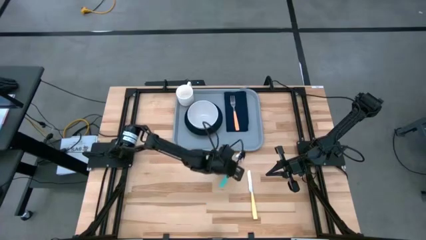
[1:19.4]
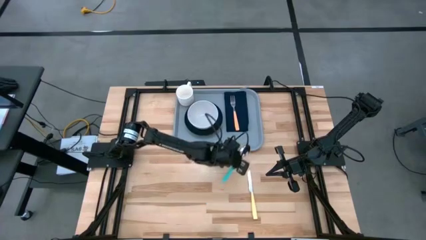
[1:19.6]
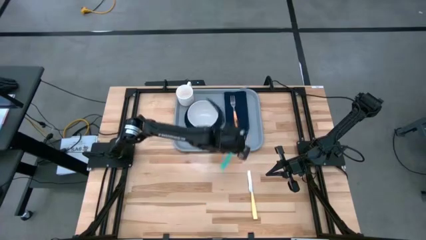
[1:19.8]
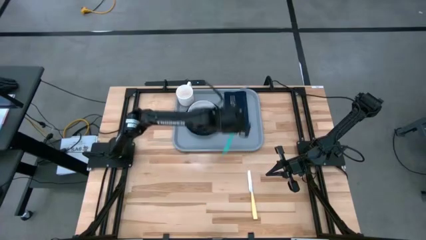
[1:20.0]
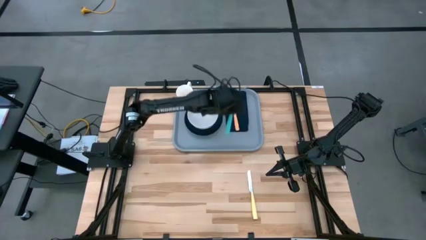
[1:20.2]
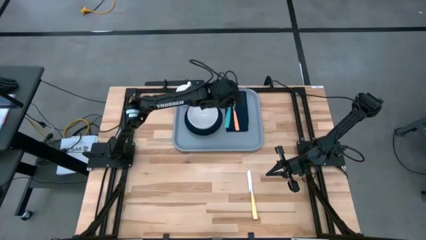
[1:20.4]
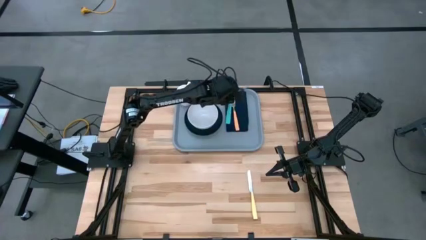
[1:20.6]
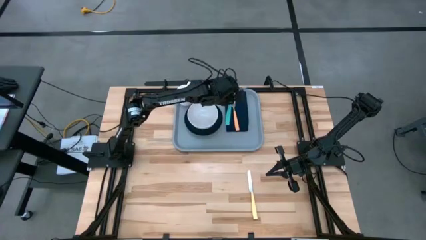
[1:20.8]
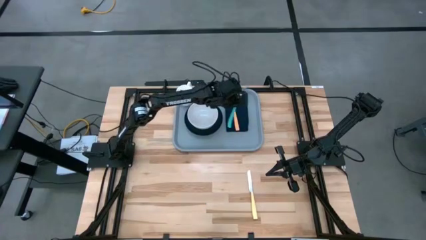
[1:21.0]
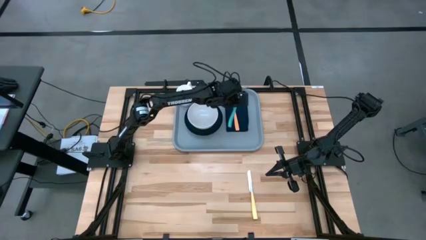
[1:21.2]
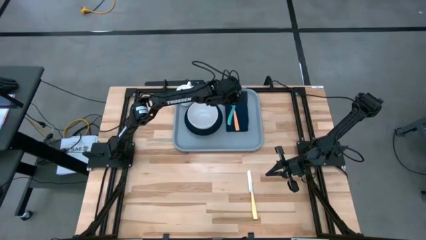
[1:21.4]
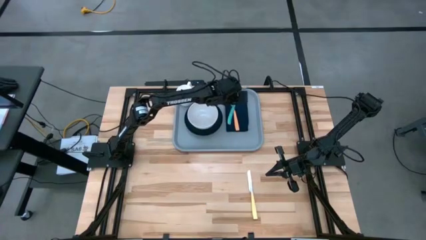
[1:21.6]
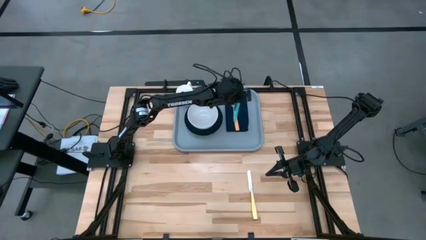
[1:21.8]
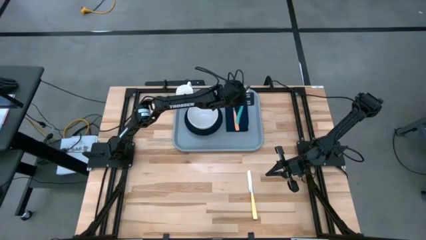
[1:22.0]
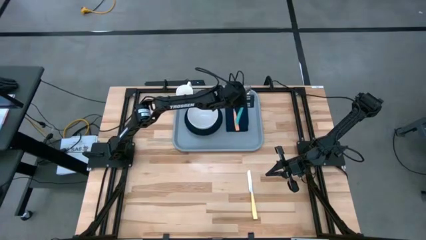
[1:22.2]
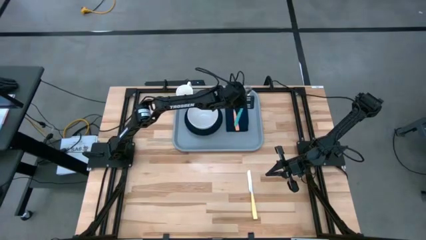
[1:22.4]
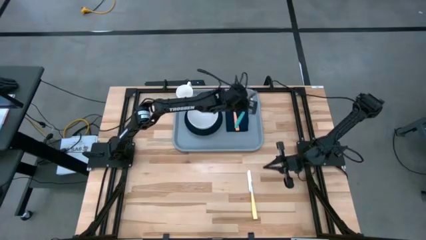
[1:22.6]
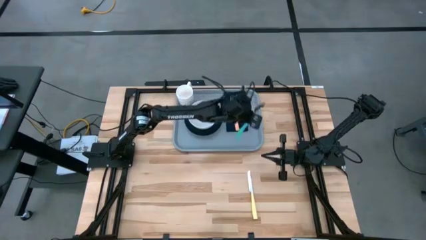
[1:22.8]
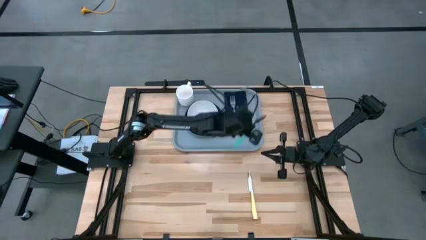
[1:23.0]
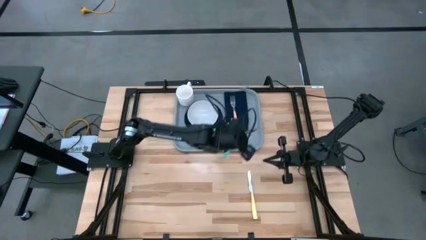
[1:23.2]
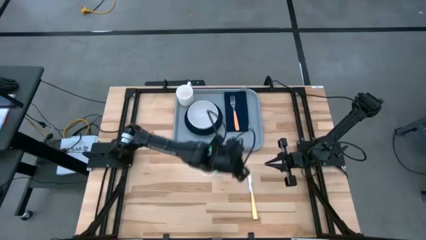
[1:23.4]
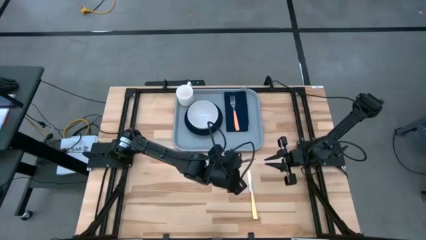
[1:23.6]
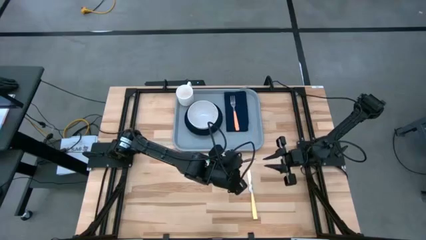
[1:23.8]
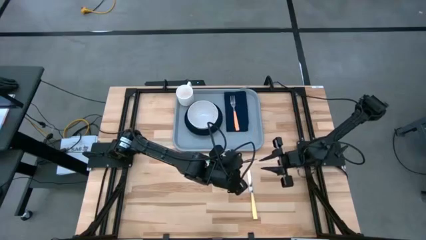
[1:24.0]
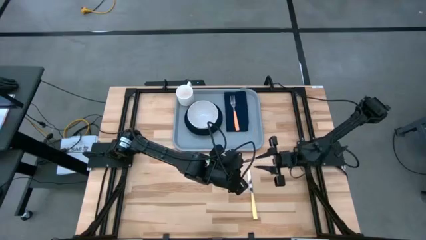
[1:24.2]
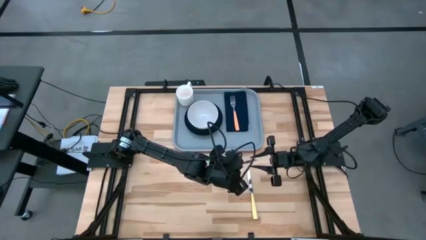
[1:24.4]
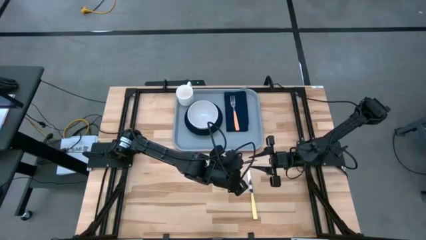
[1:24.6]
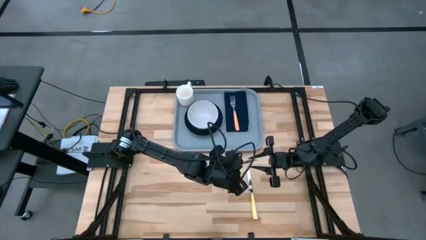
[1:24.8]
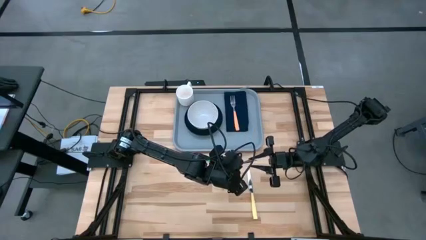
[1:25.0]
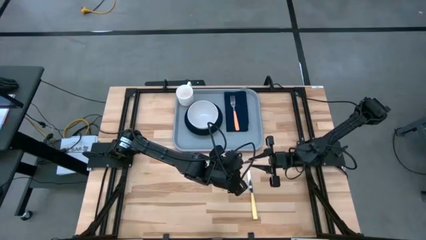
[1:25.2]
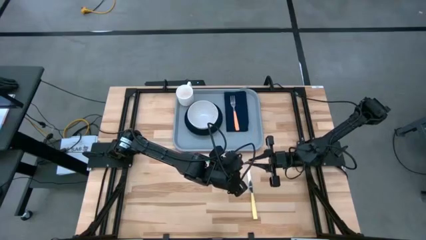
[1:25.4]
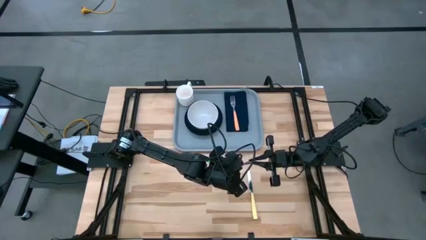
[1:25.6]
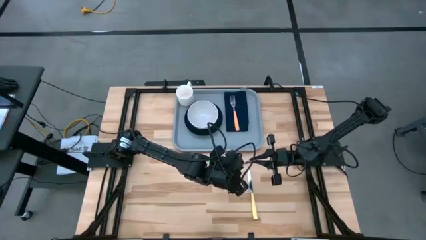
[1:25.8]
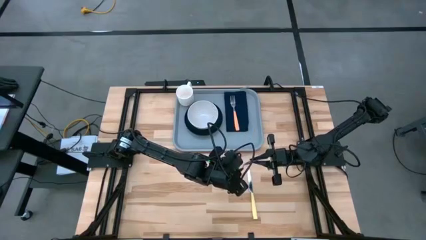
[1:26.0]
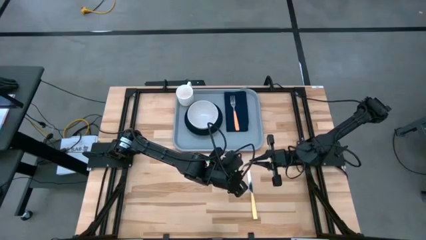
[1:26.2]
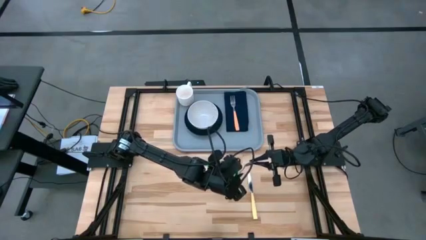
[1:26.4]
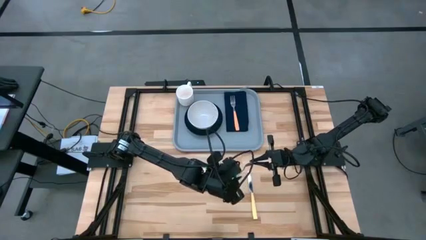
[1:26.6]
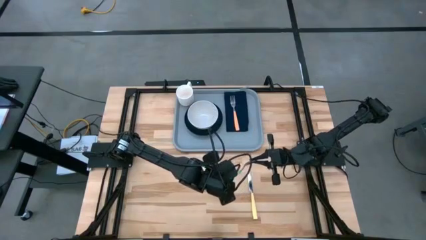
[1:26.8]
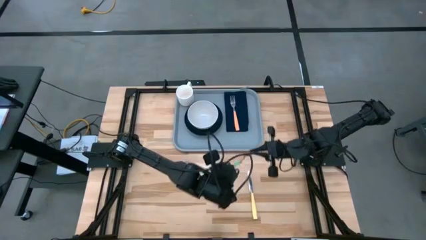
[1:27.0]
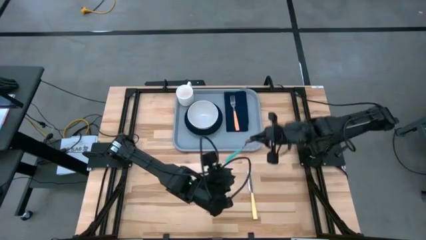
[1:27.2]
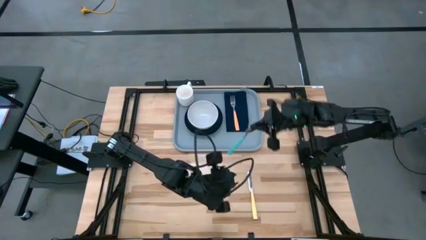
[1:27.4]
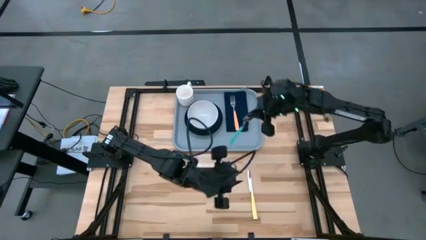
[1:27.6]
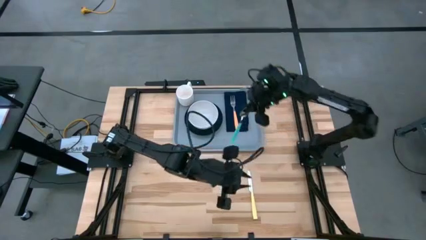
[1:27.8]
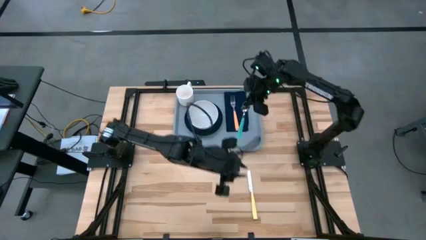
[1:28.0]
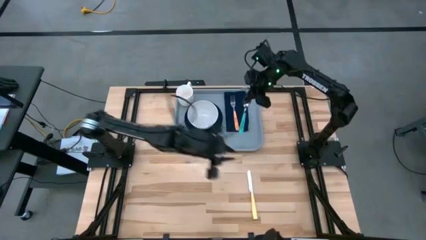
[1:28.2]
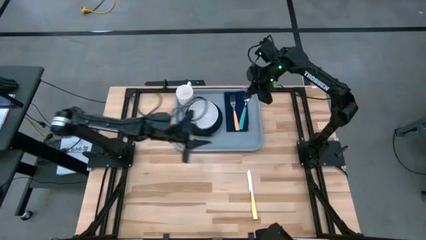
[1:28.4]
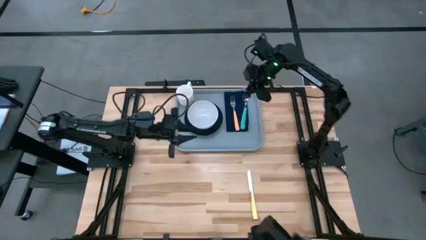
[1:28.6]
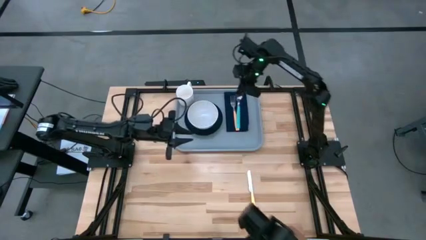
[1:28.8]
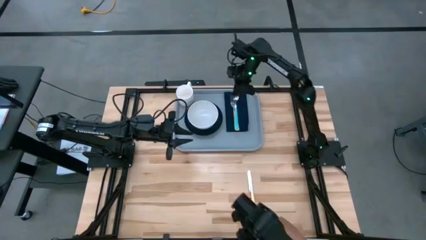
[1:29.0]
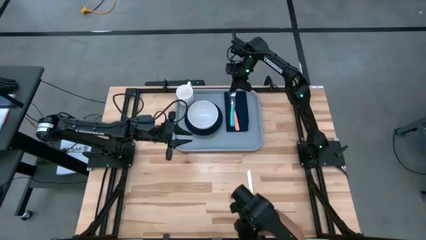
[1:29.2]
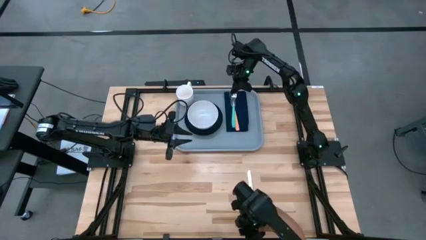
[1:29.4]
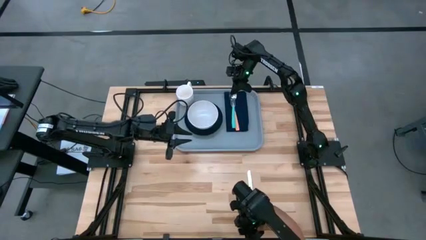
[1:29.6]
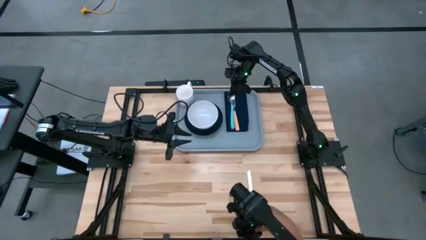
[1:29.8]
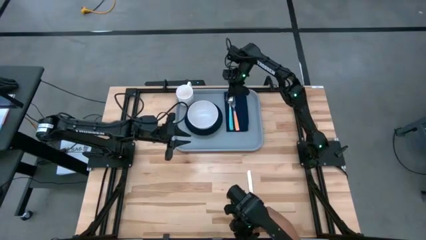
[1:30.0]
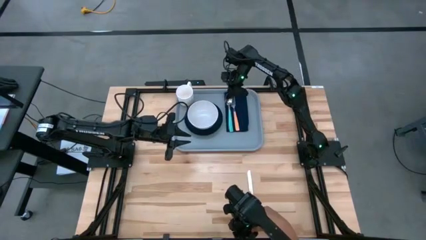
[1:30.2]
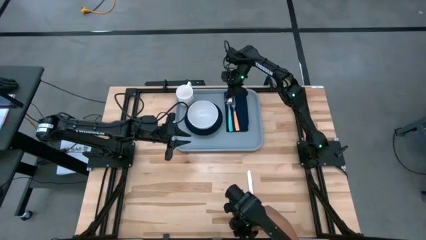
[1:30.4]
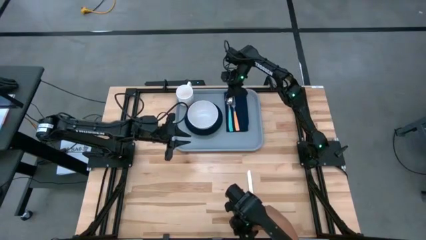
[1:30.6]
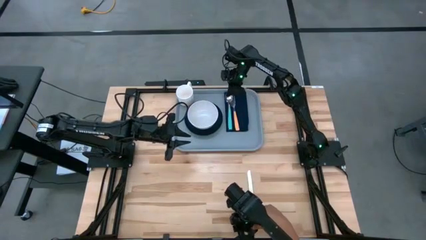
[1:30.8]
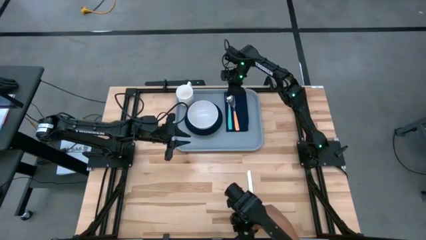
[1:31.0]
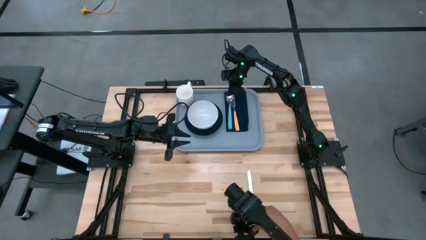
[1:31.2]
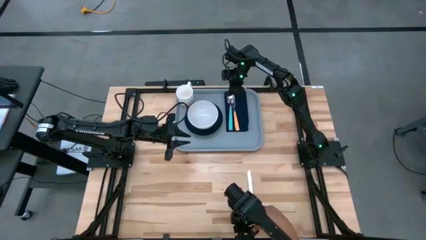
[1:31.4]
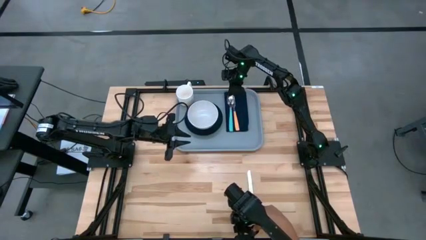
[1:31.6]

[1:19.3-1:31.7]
Task: Set up tray
Put the blue spoon on the blue napkin to the right of the green plate
